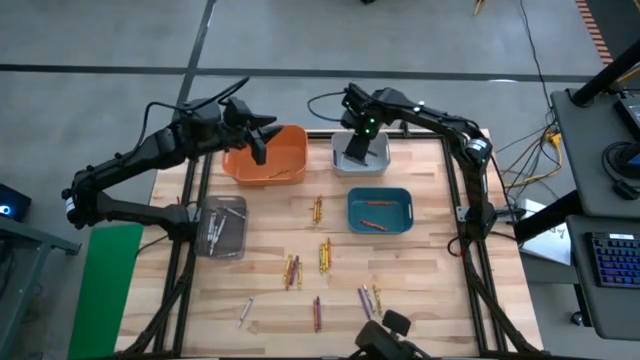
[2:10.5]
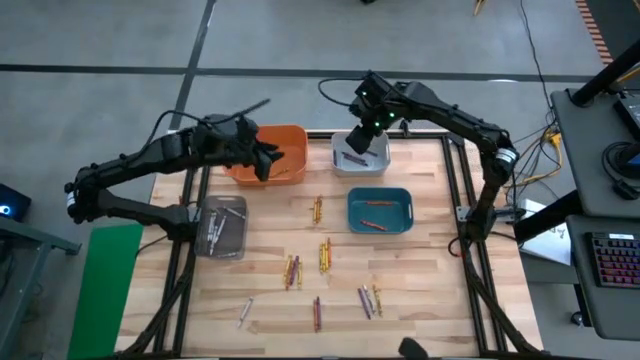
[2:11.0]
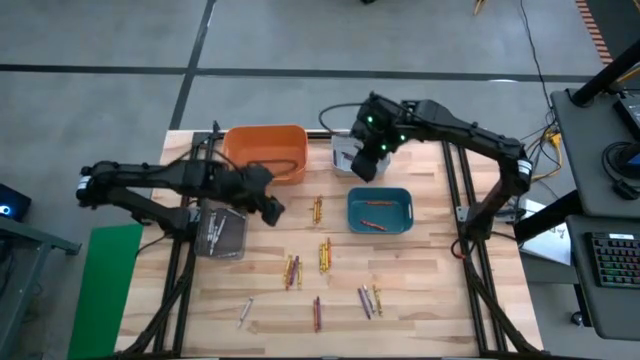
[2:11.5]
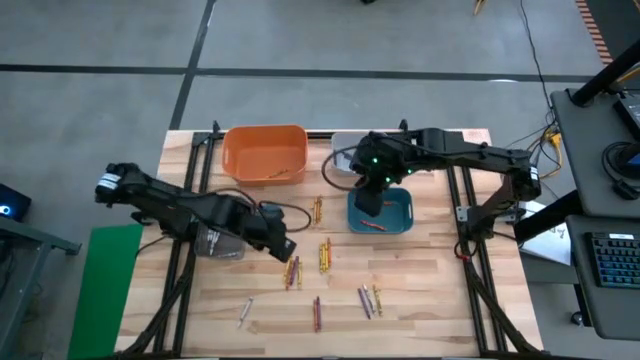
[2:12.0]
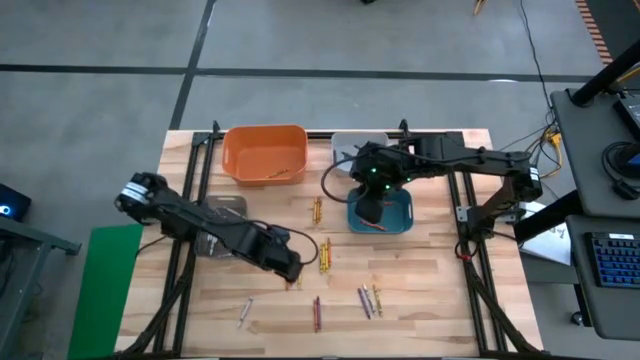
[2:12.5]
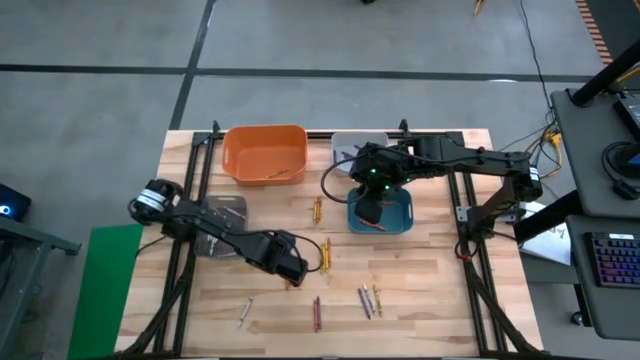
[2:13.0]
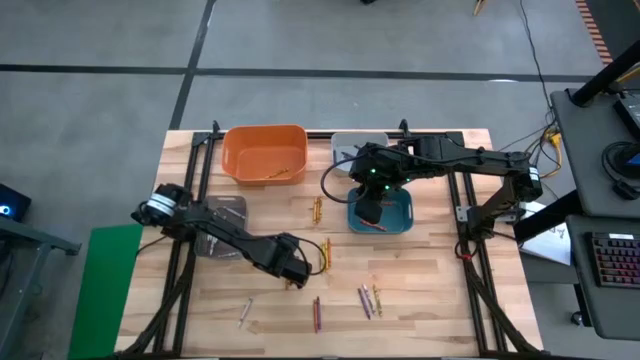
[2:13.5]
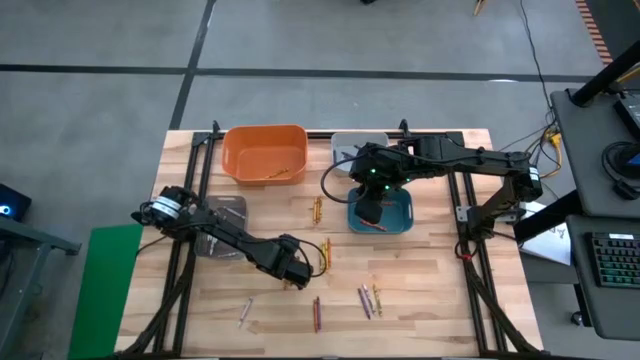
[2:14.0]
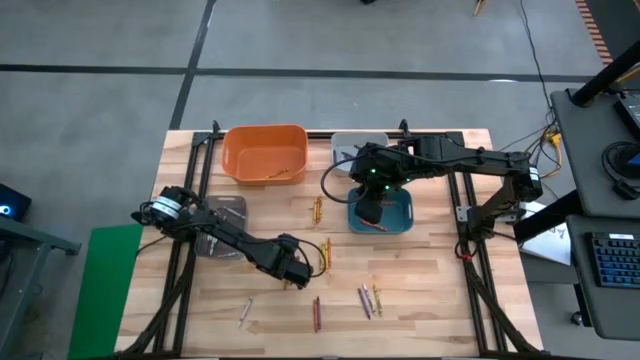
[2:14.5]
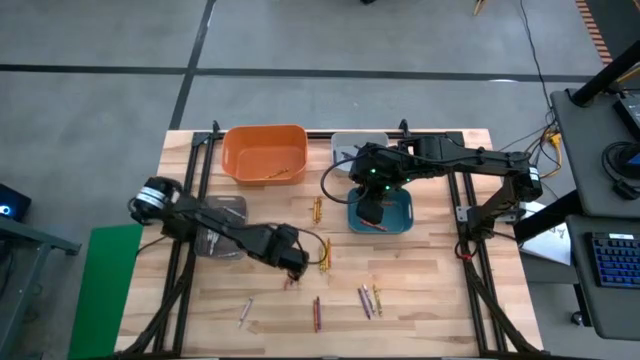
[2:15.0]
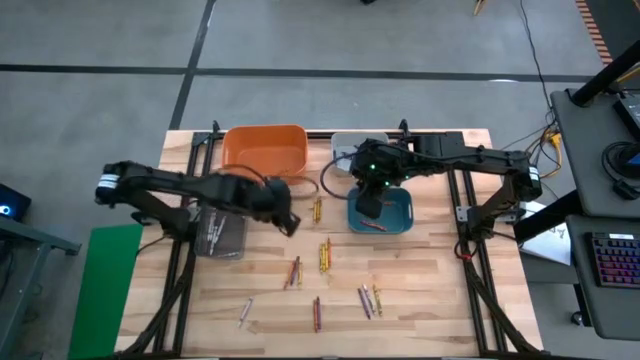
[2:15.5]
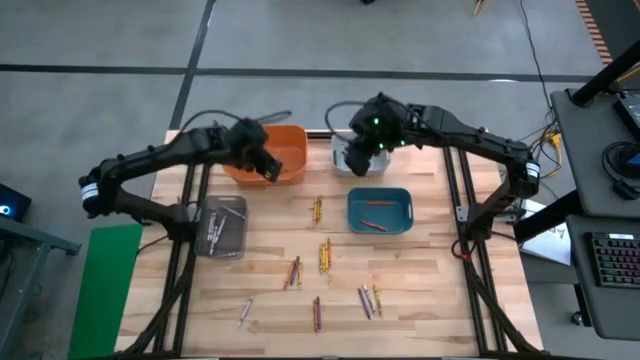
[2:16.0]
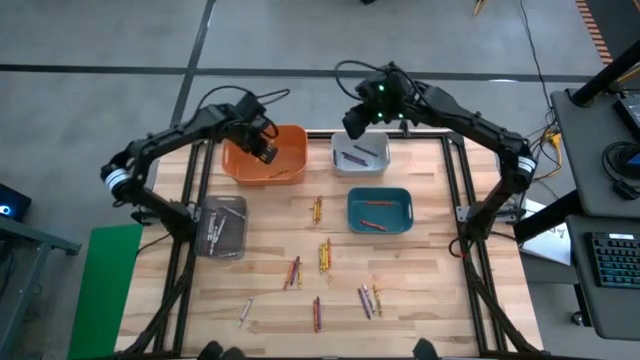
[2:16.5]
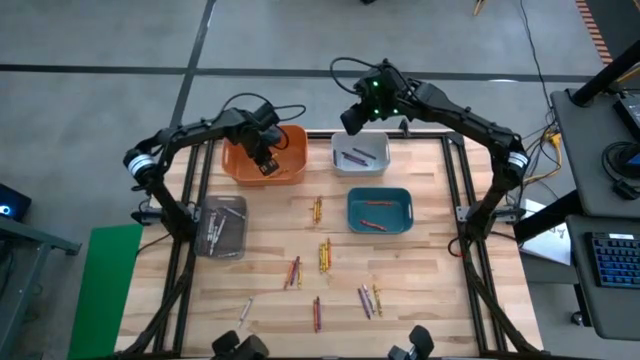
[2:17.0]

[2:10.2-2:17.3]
Task: Sort crayons
Put the yellow crayon into the orange bin

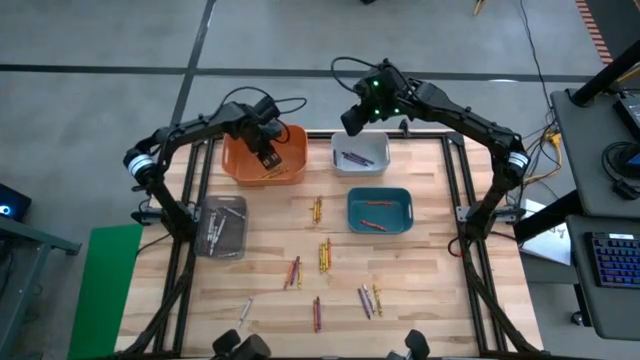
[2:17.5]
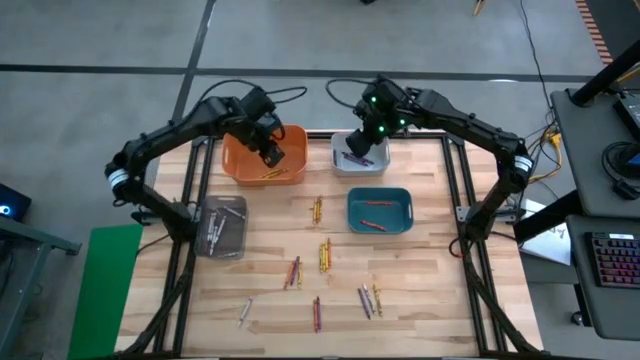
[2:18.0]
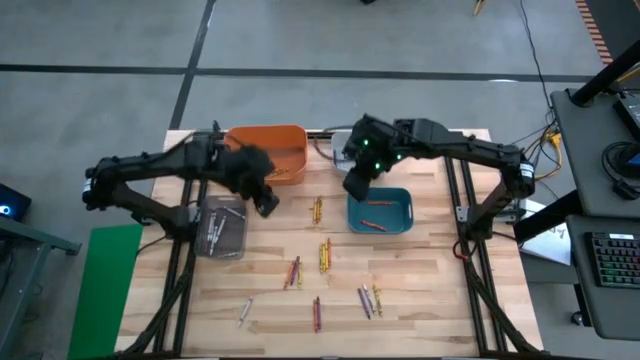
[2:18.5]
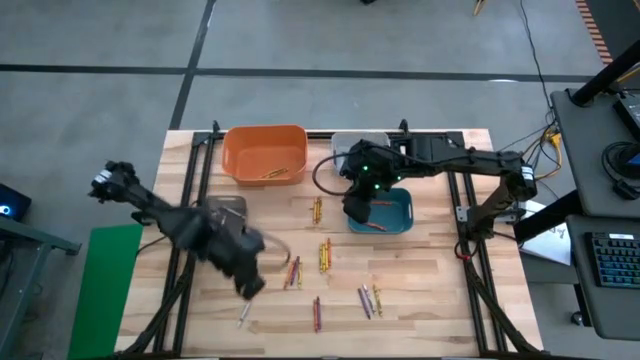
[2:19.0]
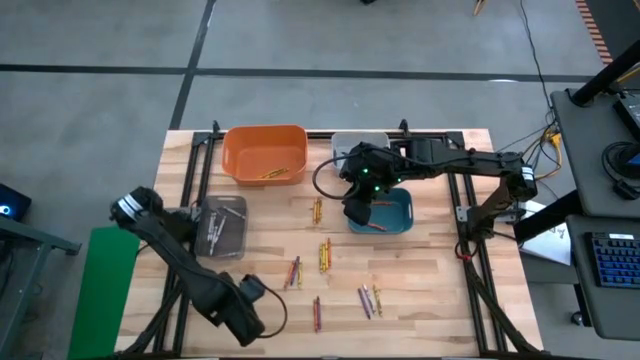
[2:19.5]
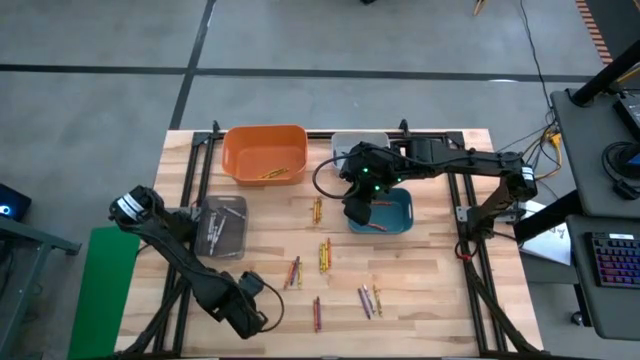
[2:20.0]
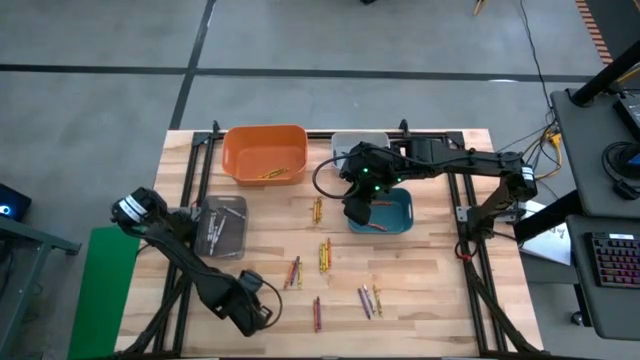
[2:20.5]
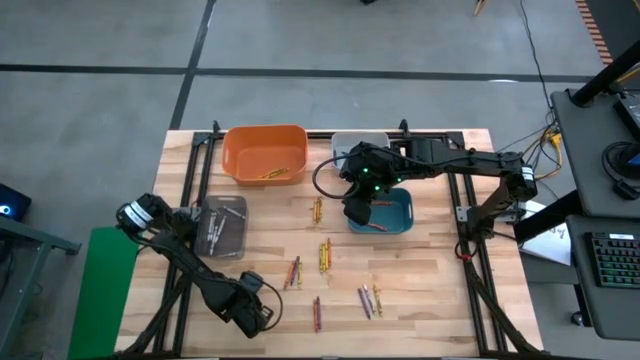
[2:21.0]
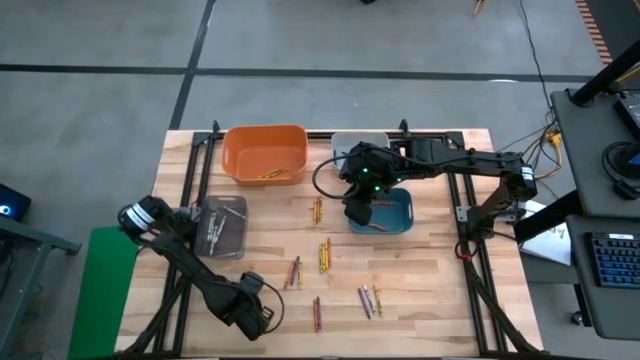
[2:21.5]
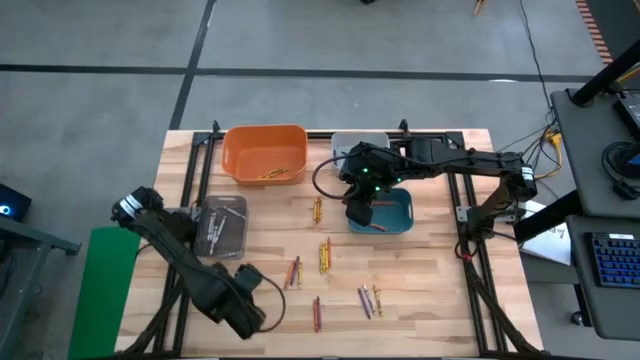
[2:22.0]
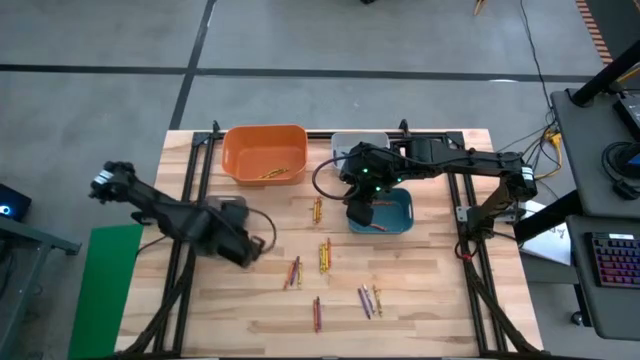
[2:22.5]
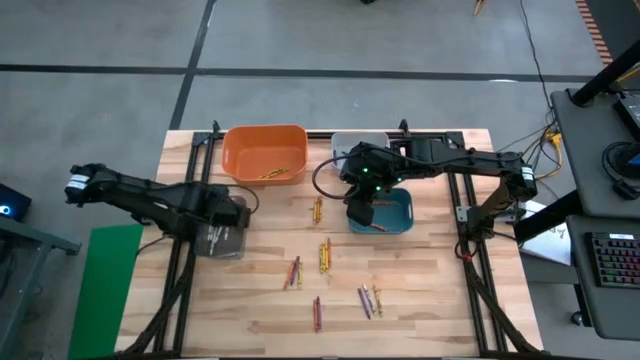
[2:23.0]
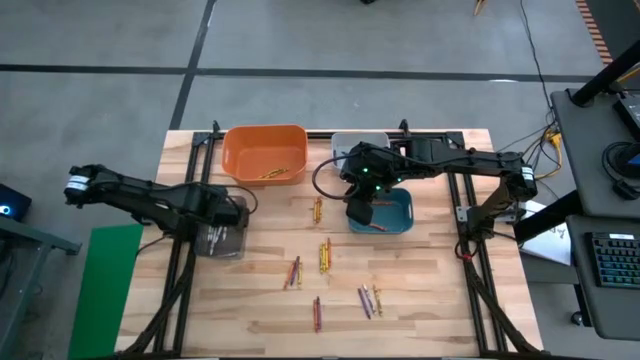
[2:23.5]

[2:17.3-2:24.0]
Put the white crayon into the black bin

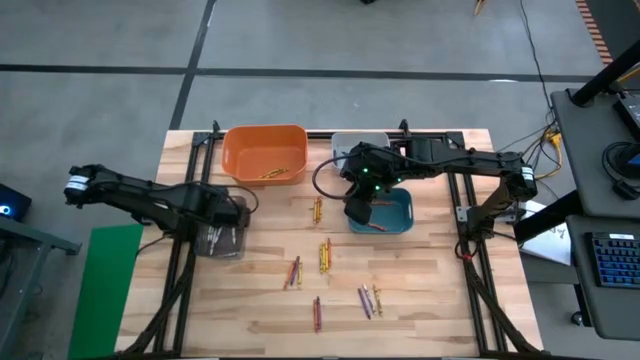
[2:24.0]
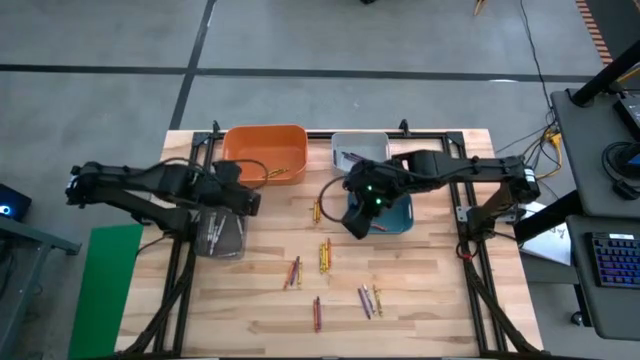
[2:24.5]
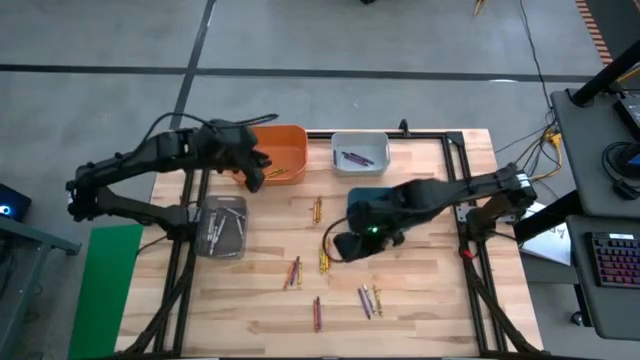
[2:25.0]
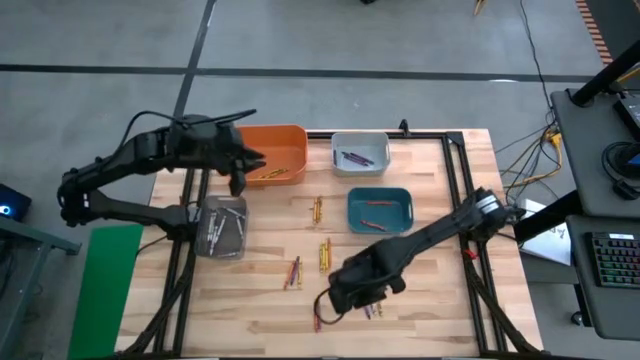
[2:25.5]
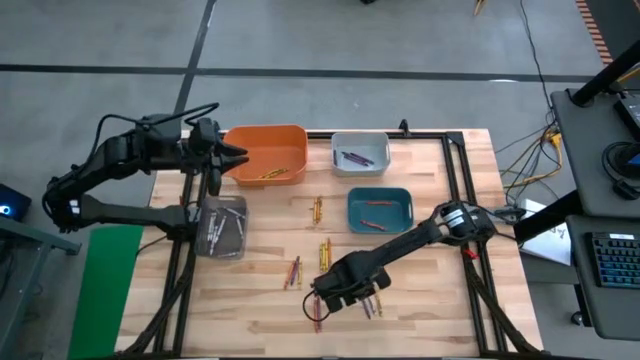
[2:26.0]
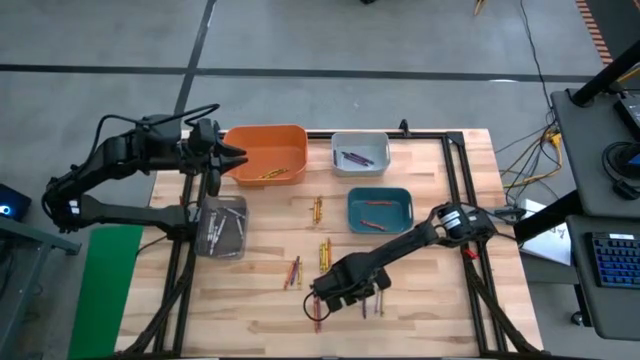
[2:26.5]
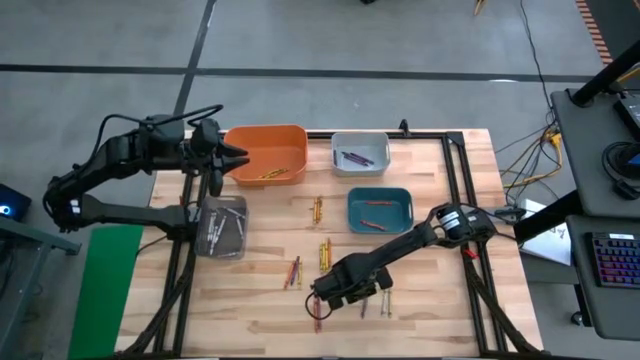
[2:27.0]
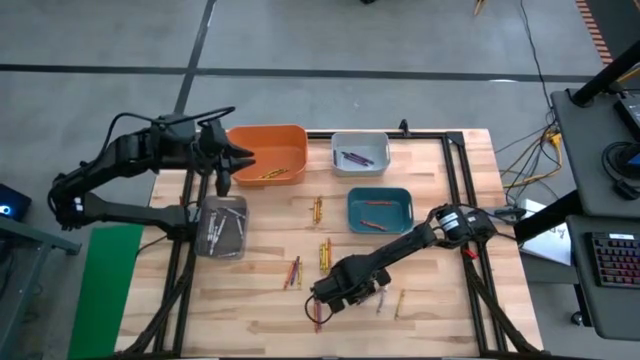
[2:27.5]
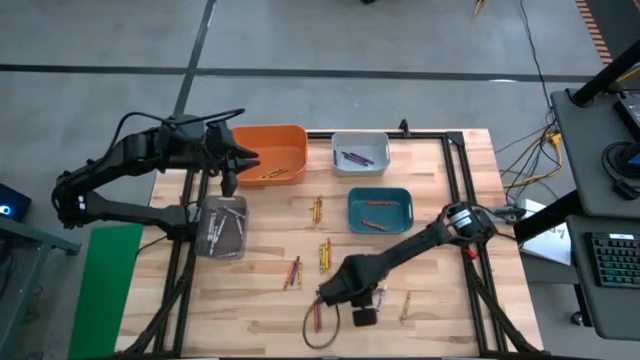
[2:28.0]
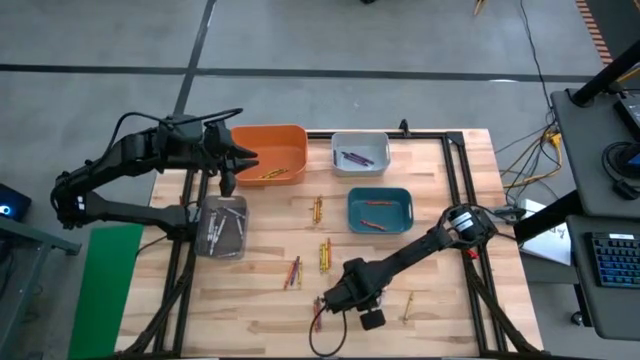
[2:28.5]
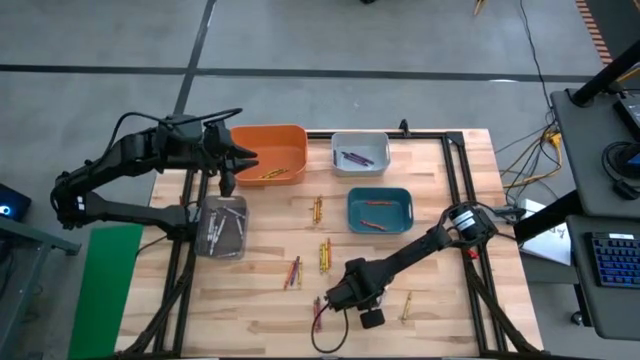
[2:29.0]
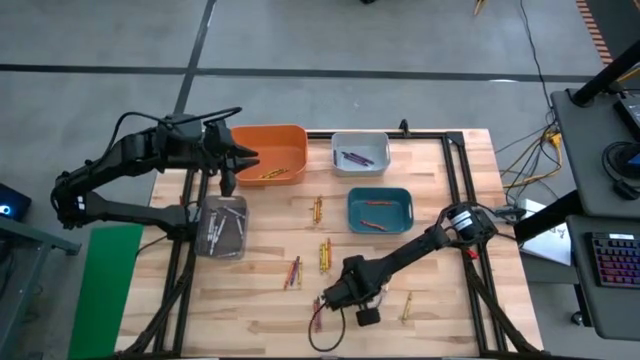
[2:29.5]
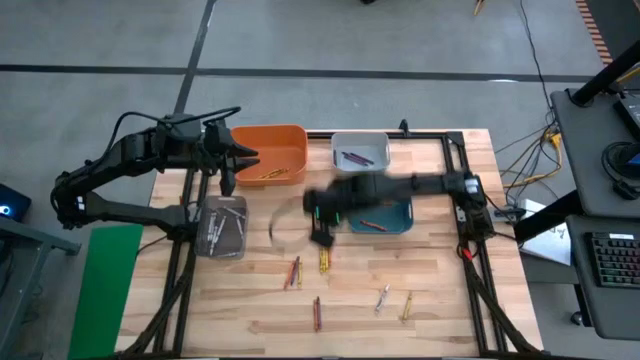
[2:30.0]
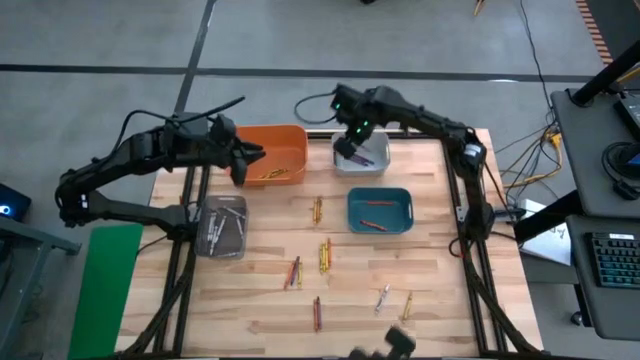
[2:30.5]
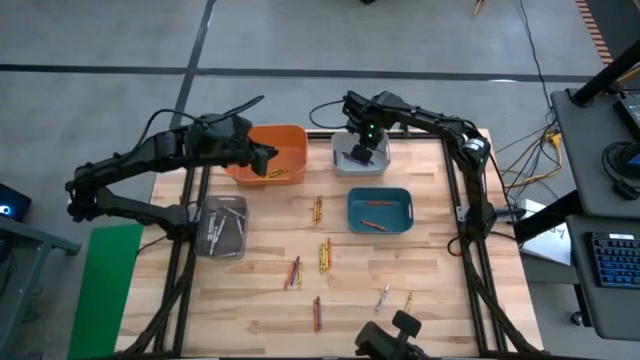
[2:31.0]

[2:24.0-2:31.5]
Put the violet crayon into the gray bin

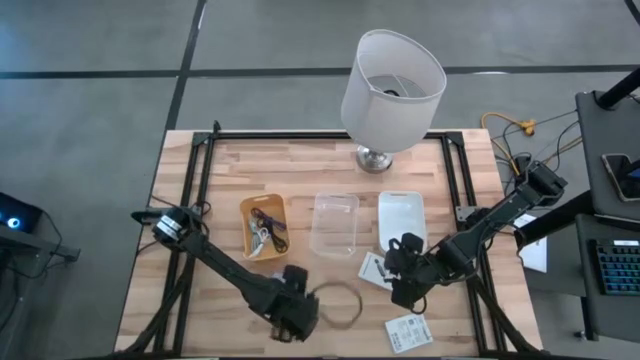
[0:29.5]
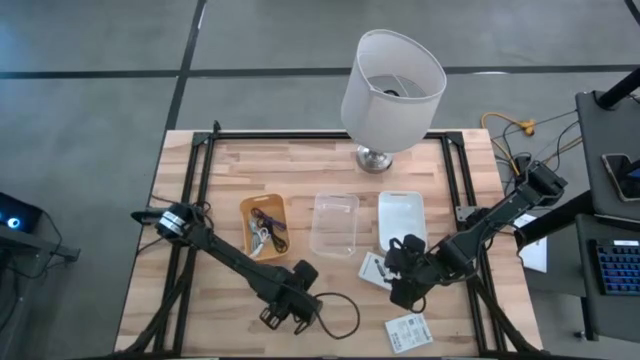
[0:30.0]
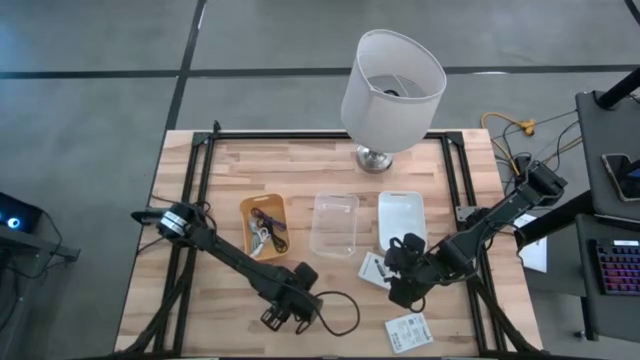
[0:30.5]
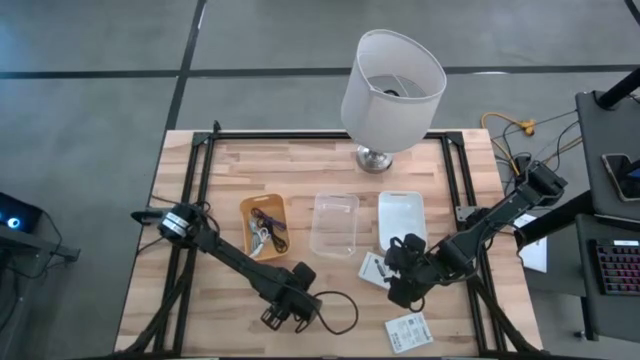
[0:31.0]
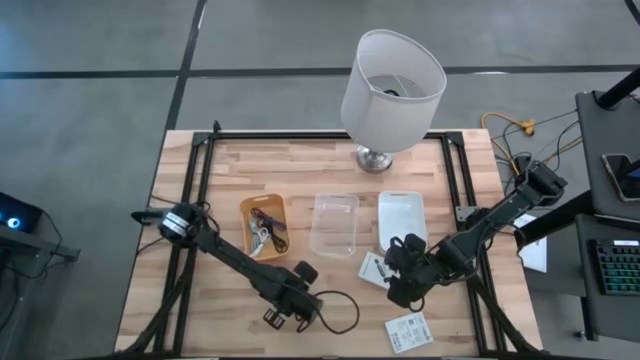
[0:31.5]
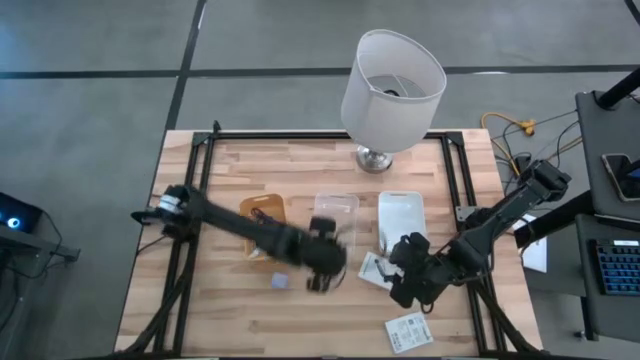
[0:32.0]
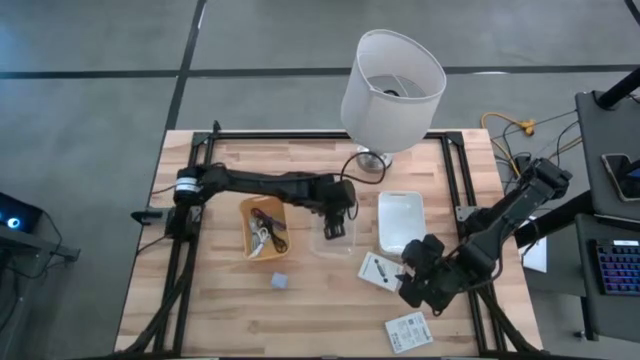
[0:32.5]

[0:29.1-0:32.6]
Task: Pick and place items into bin
Put the green charger adapter into the transparent bin
